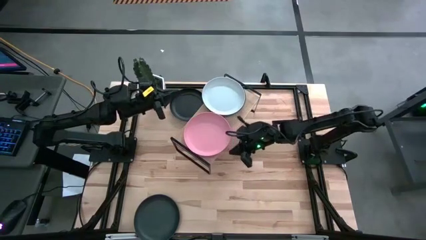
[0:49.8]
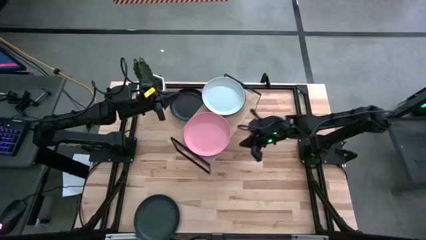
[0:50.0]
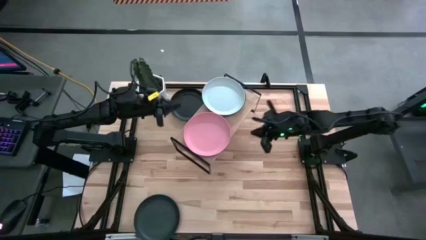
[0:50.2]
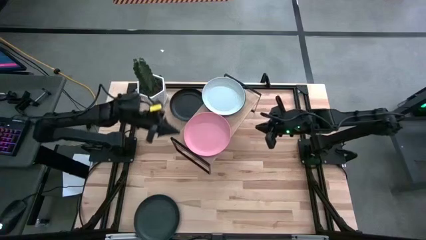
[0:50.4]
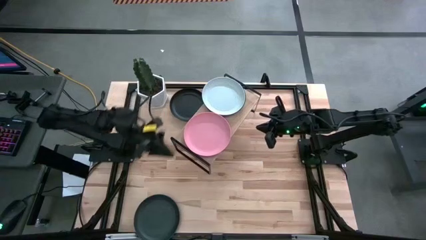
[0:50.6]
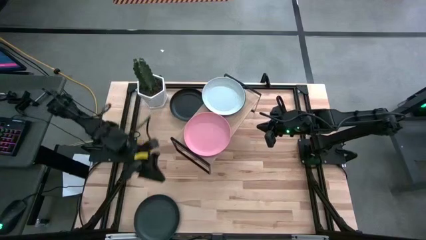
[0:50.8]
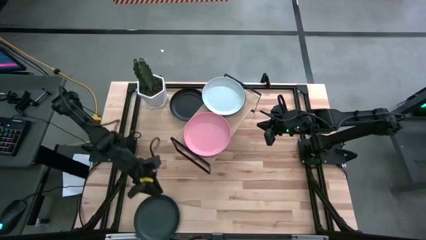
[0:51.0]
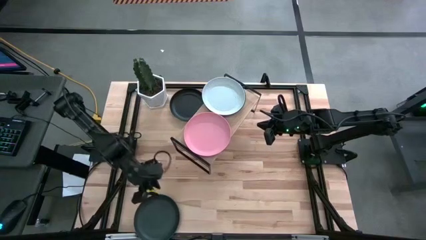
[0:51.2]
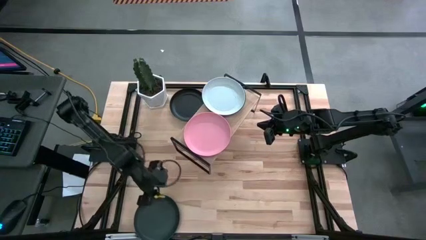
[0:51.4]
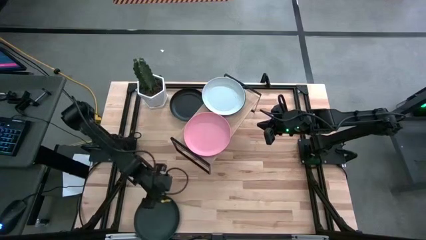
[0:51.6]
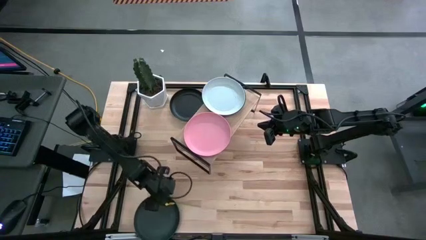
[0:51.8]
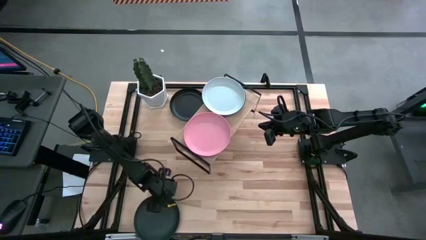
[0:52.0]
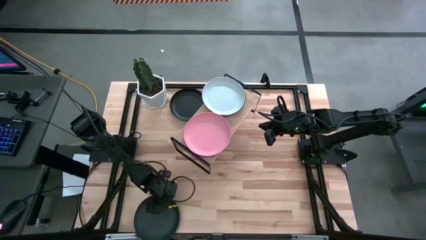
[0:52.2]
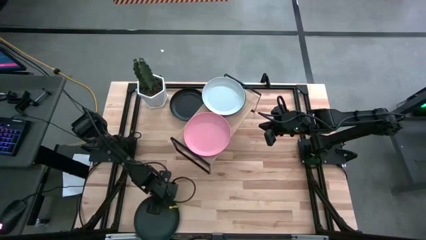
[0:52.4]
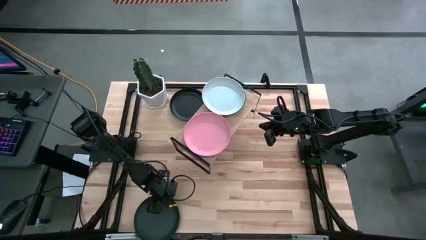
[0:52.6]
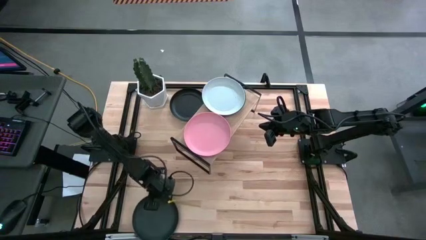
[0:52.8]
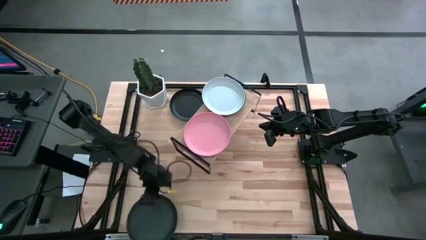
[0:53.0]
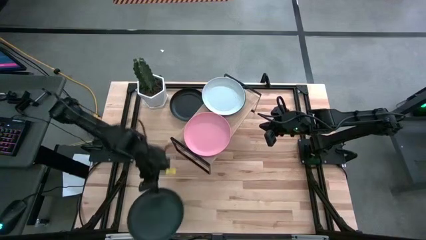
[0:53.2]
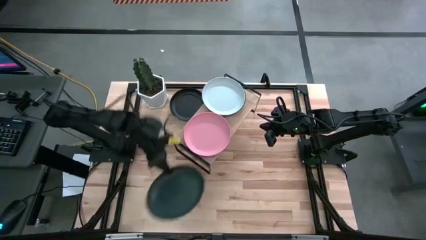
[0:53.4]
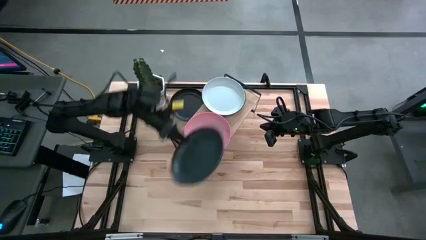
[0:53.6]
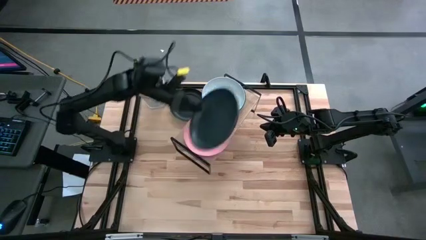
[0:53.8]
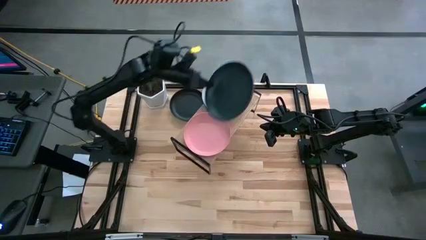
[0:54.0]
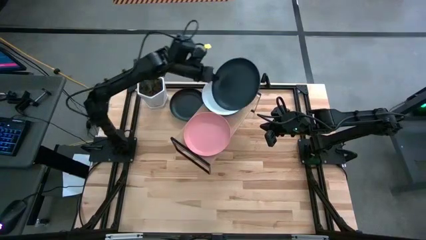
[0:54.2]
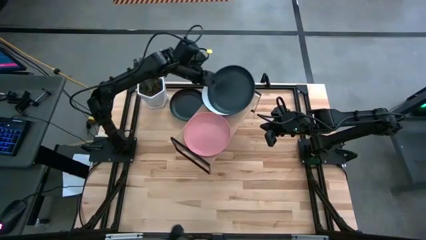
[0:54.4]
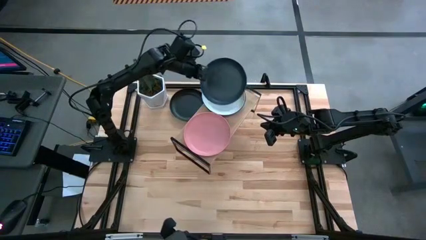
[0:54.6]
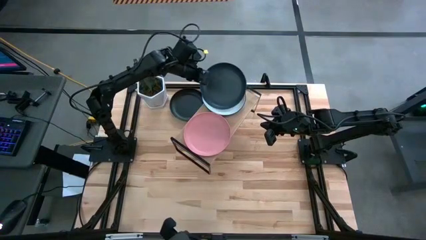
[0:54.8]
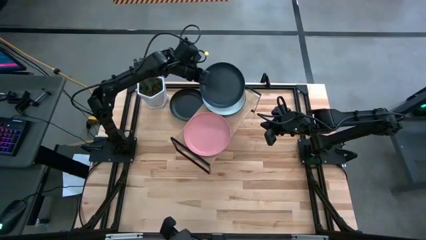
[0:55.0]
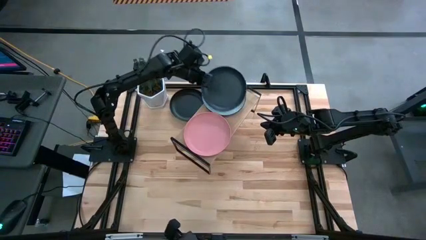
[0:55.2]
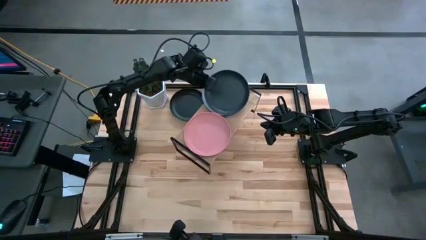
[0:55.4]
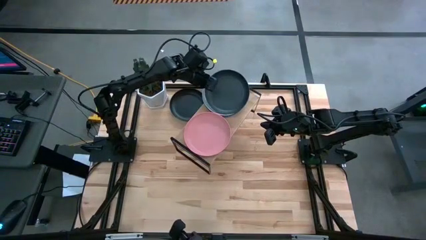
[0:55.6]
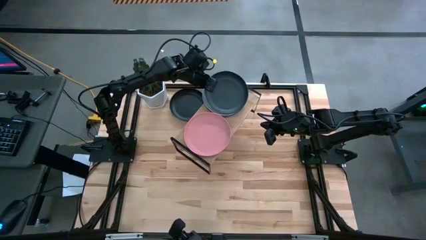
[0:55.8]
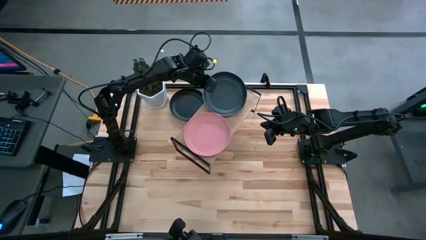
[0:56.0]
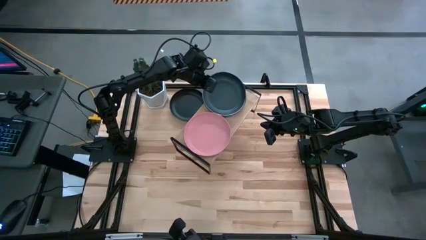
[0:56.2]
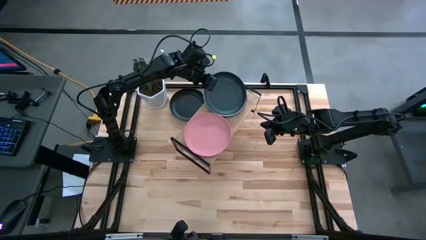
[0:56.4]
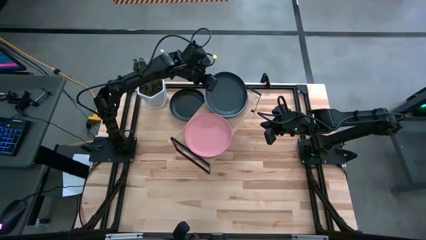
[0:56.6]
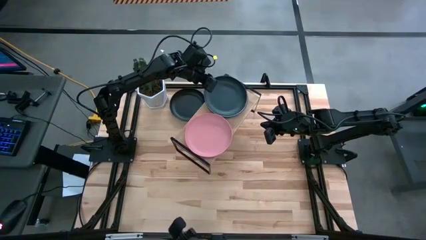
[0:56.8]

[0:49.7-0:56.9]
Task: Place and stack plates onto a shelf
Stack the bottom black plate on top of the white plate on the shelf

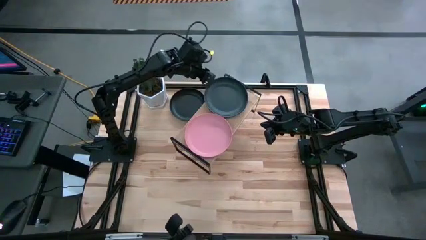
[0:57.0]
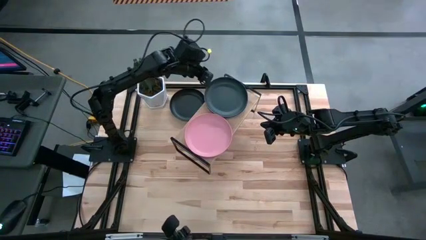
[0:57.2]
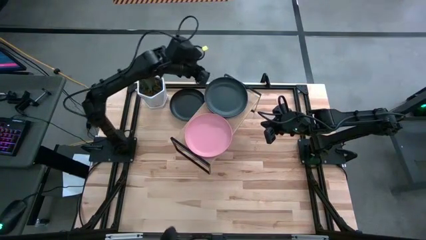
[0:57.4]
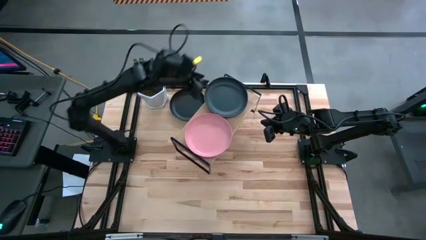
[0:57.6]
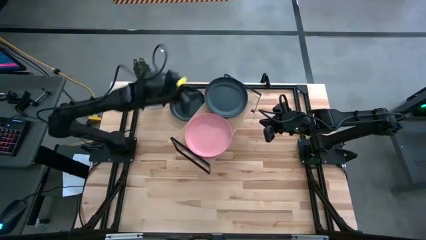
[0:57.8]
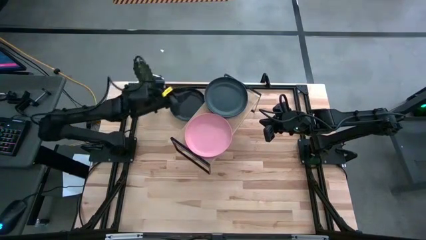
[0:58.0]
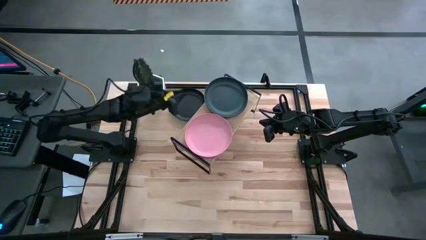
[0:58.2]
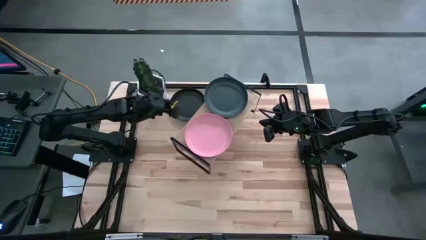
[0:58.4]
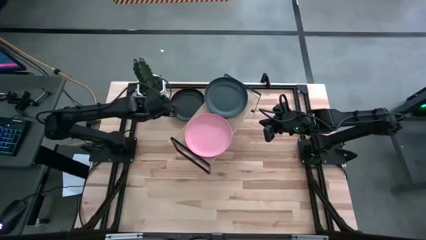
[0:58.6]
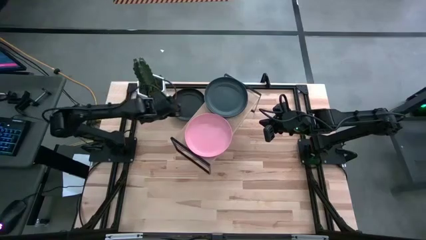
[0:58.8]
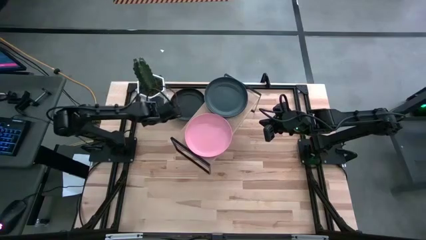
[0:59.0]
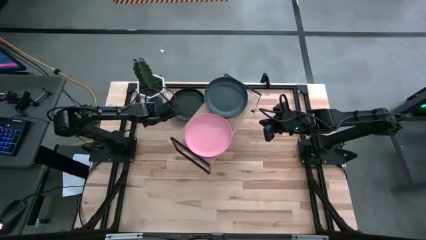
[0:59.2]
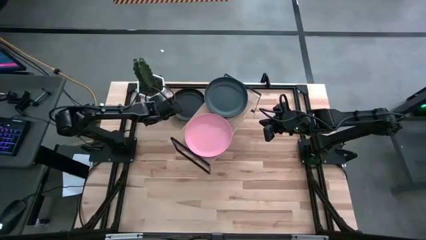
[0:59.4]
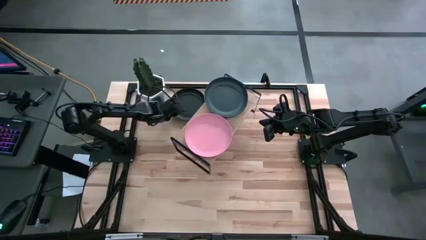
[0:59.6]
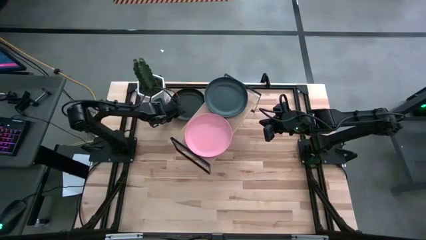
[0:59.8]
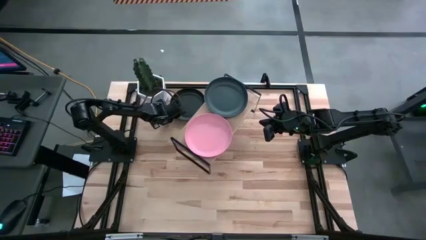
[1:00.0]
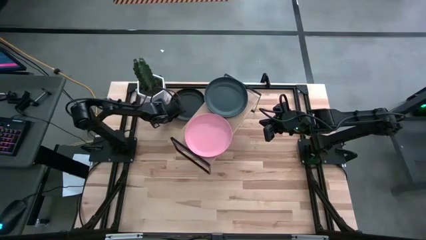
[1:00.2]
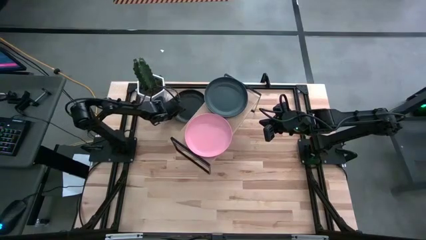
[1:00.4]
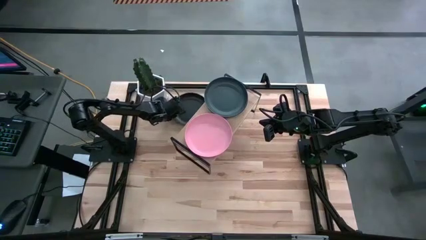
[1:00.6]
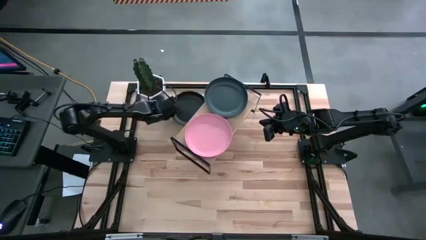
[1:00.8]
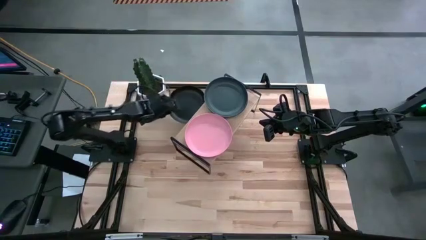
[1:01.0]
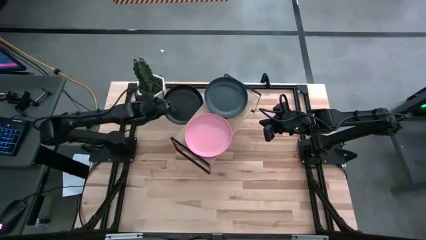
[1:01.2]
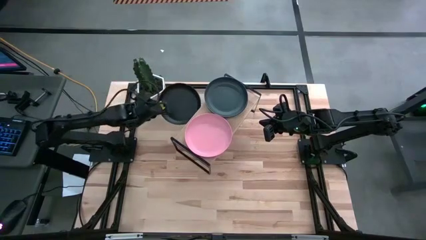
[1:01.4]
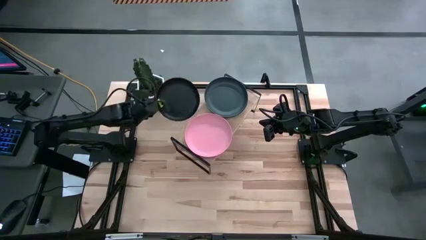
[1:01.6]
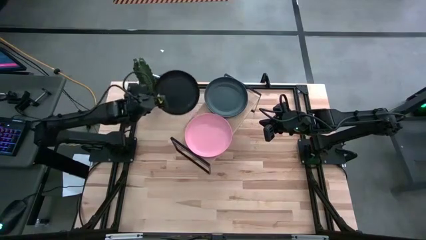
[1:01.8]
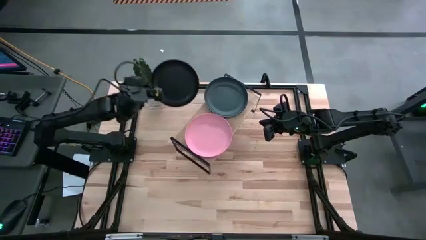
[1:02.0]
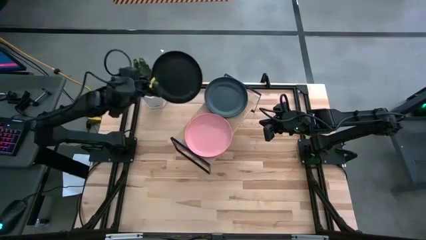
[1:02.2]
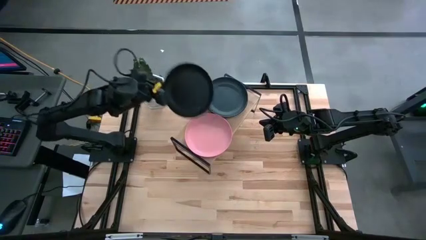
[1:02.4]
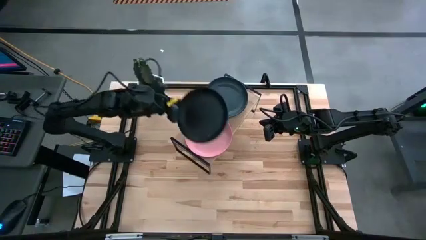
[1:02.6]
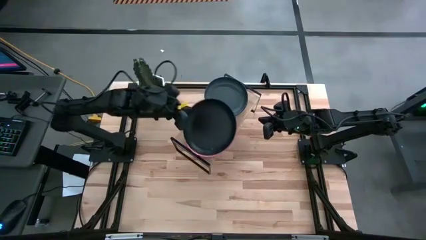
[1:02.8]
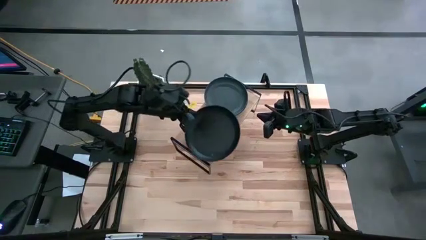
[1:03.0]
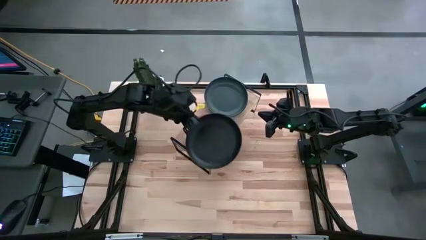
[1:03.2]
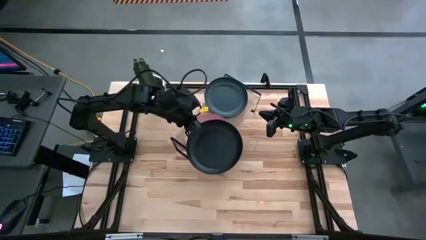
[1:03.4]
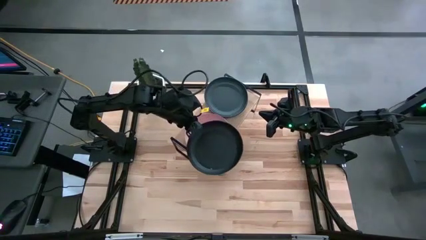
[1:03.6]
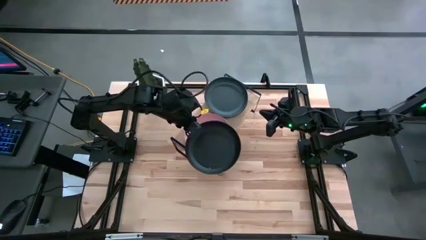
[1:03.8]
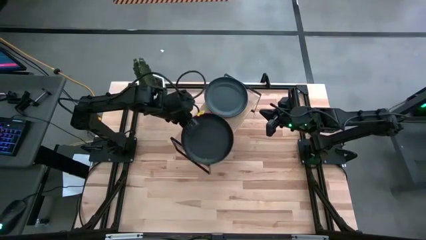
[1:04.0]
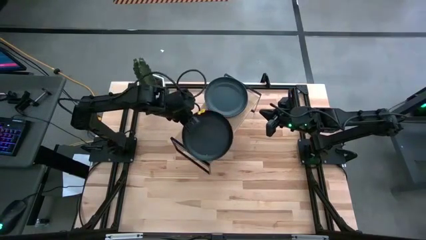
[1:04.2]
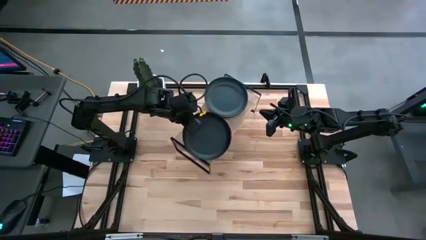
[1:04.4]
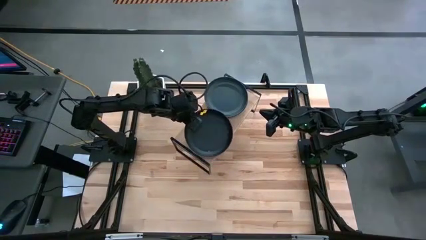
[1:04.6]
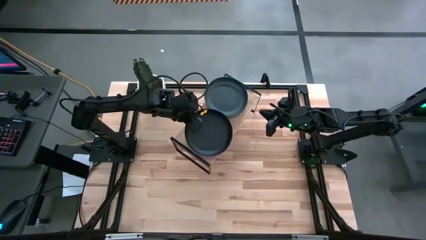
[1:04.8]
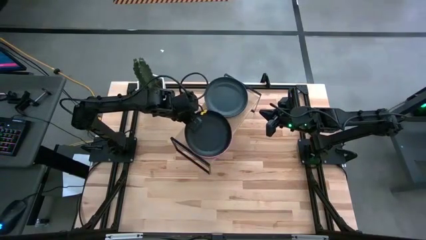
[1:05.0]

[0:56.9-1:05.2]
Stack the black plate on top of the light pink plate on the shelf
